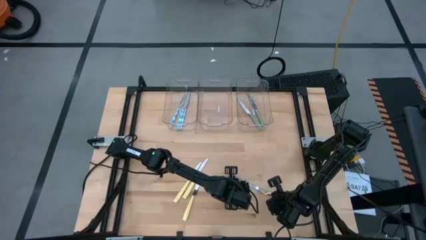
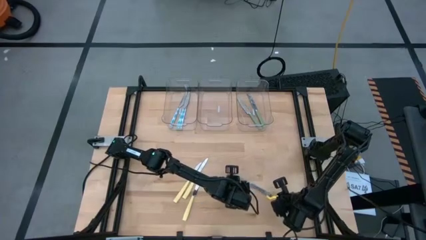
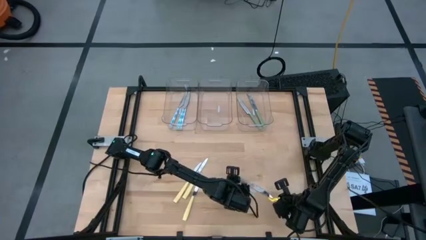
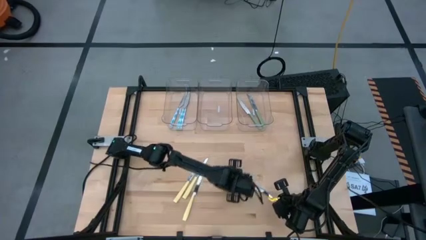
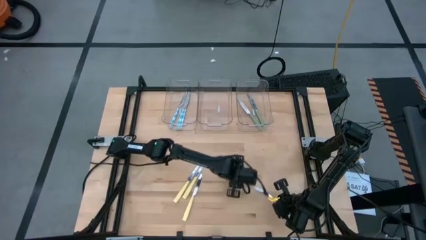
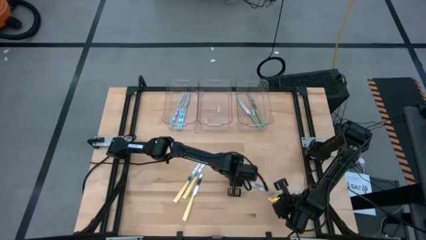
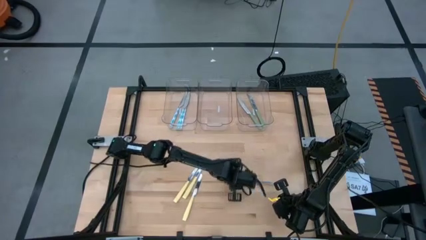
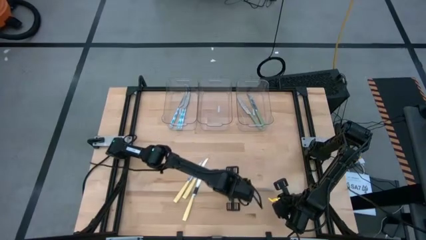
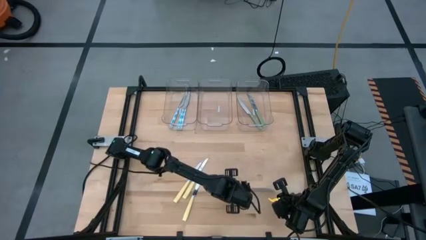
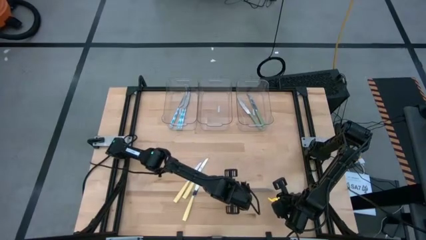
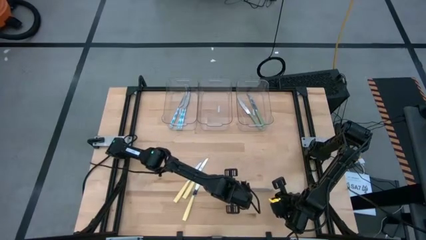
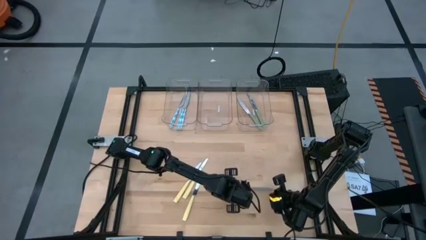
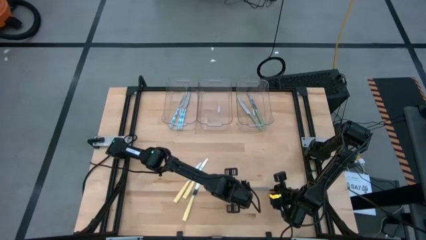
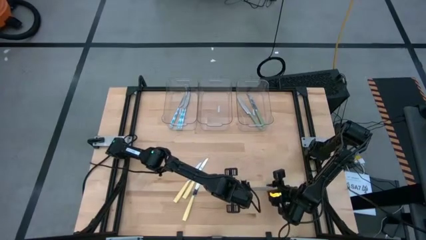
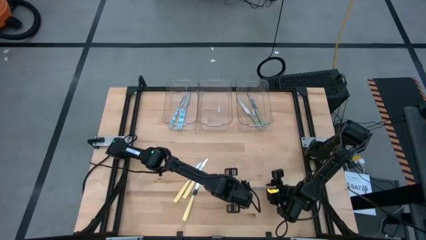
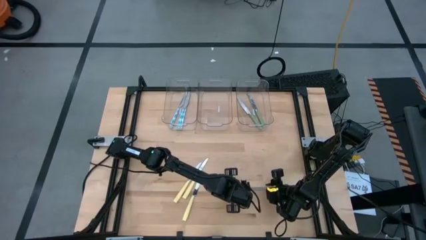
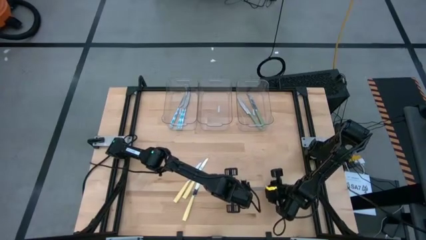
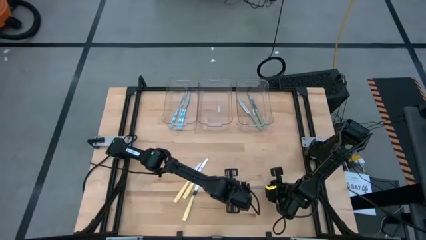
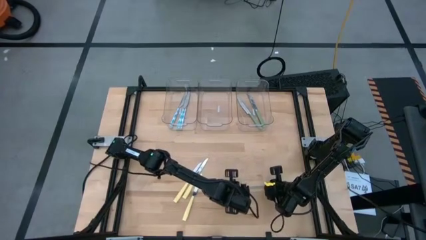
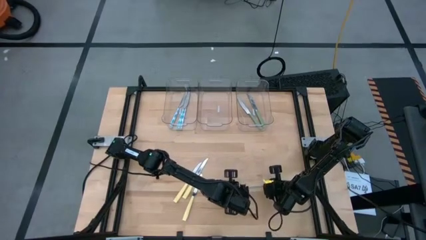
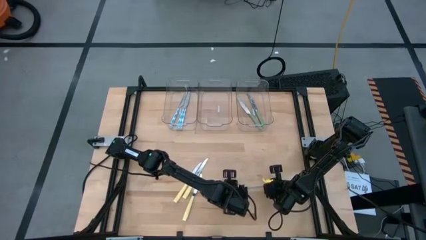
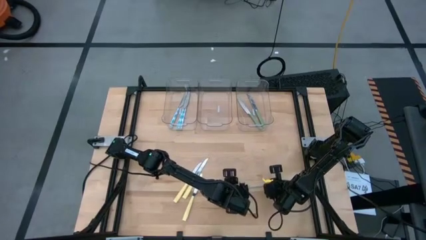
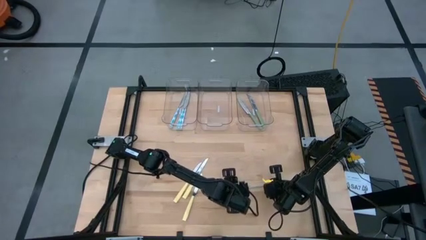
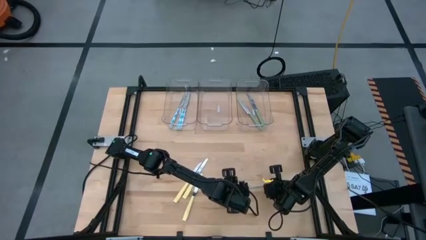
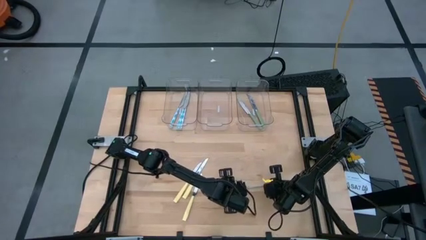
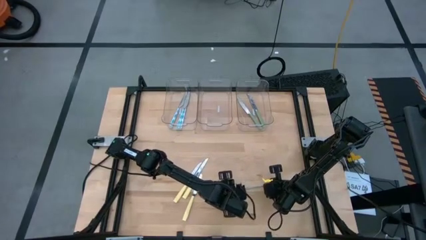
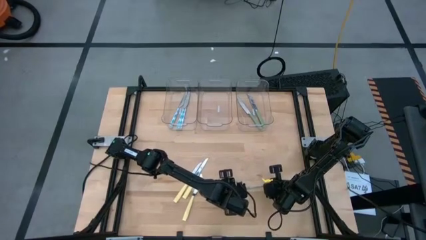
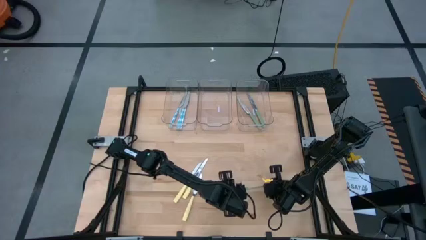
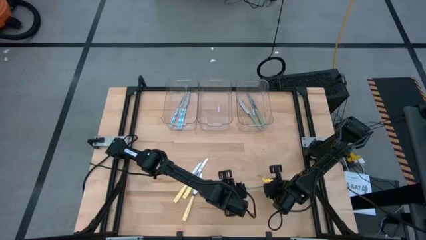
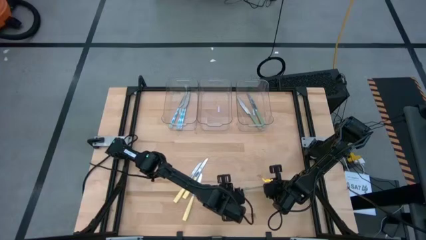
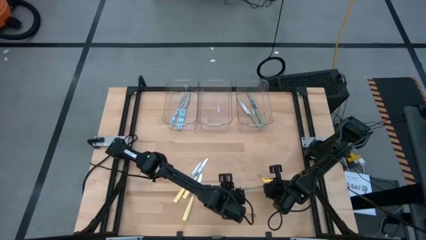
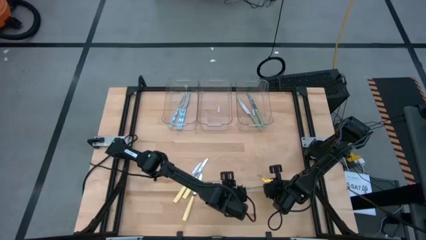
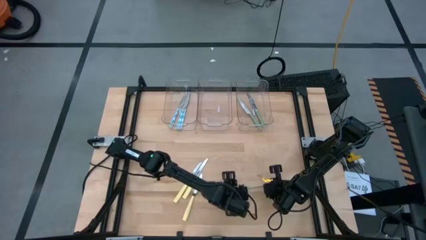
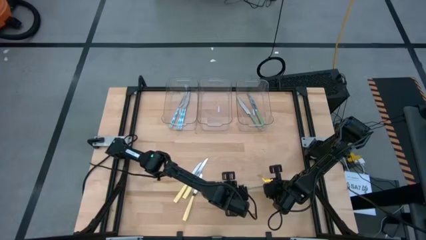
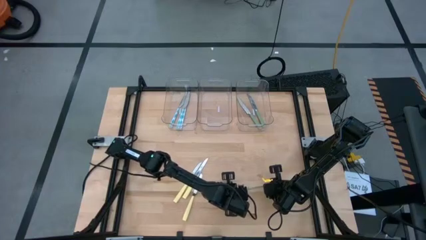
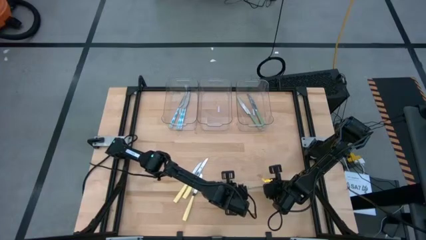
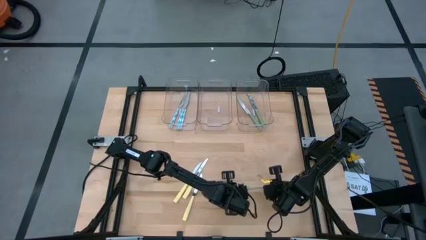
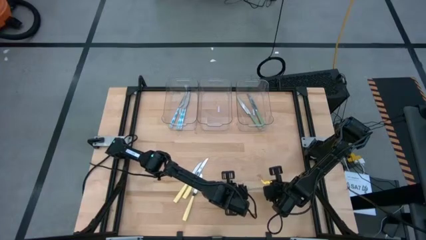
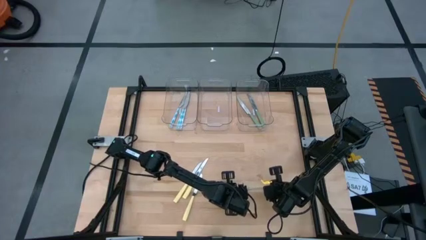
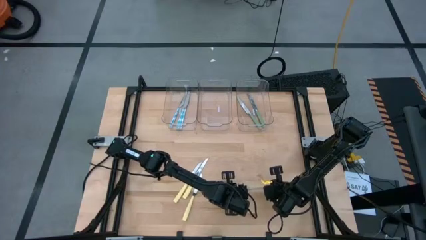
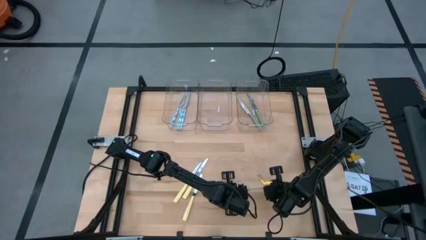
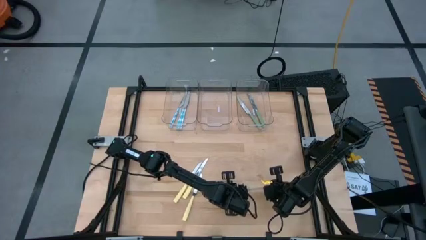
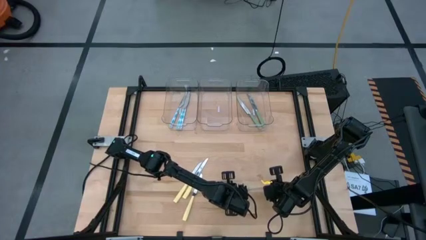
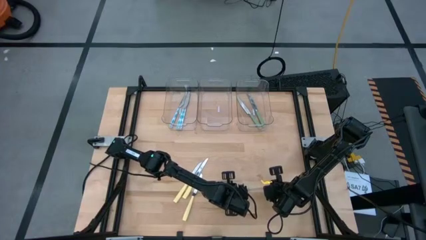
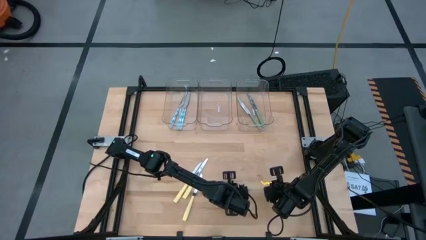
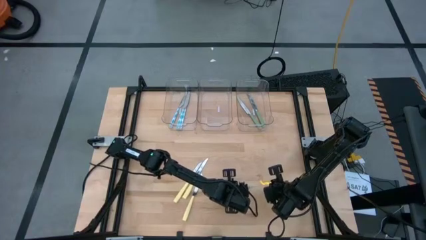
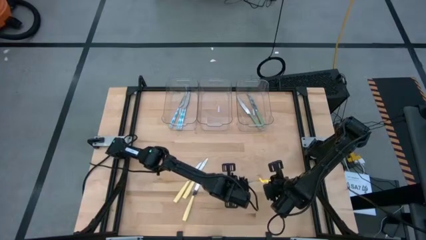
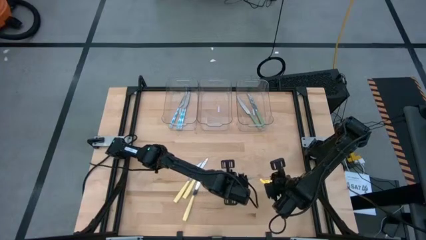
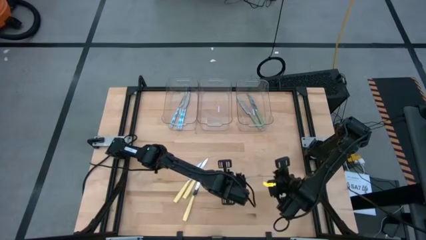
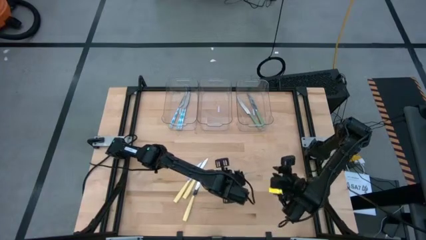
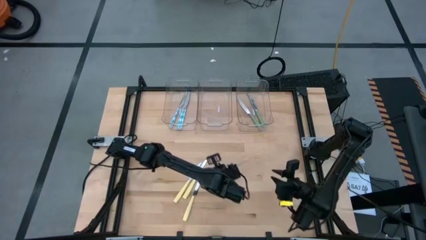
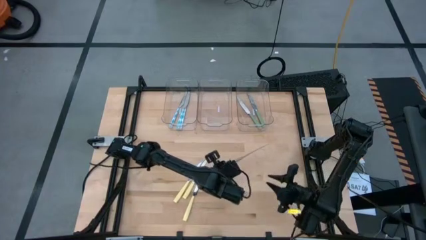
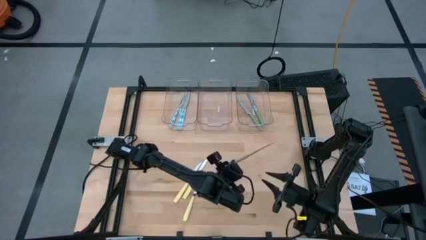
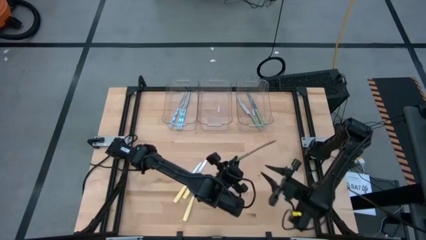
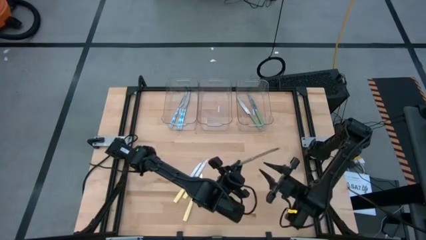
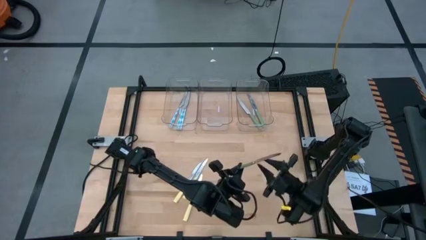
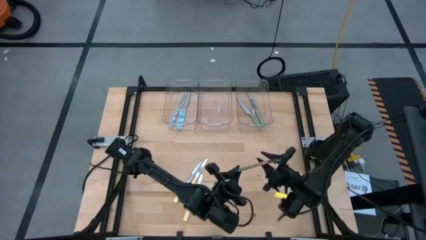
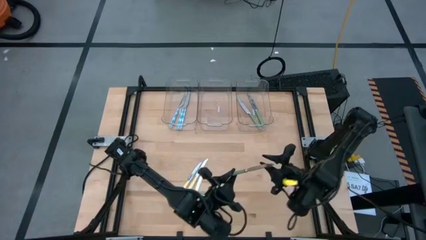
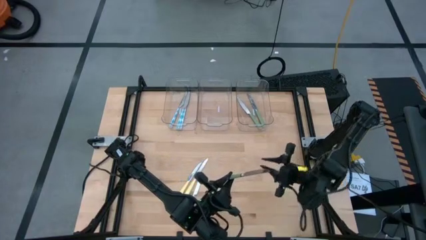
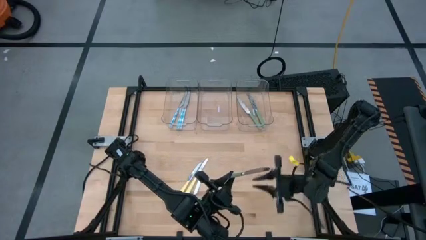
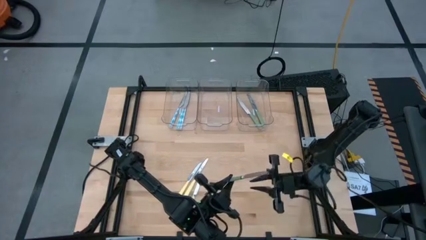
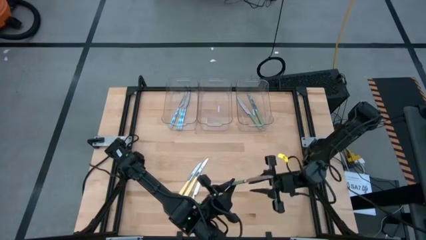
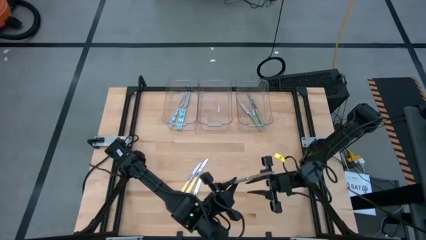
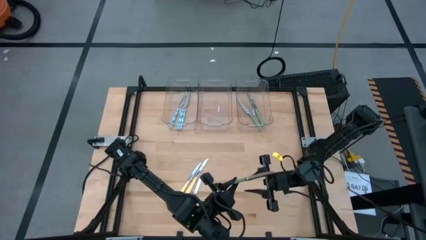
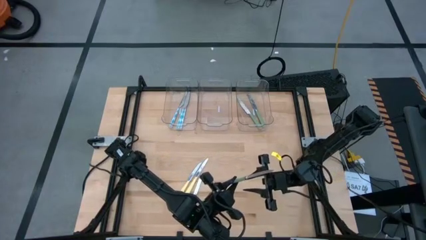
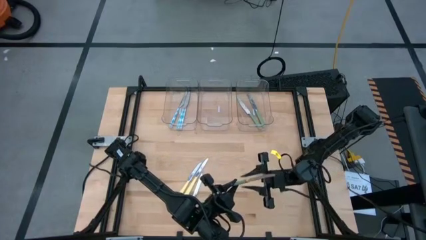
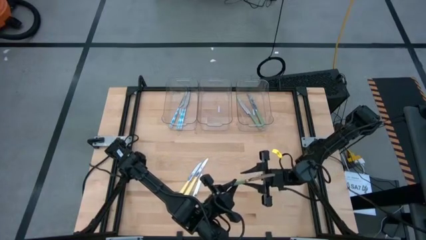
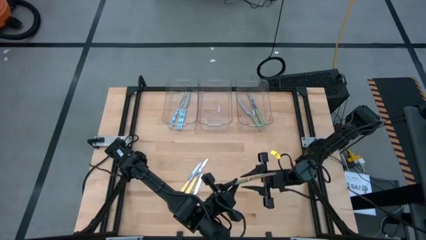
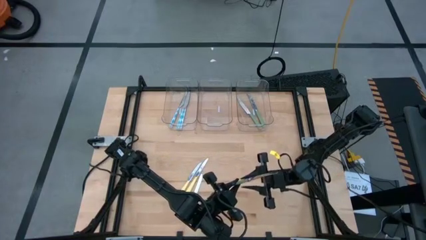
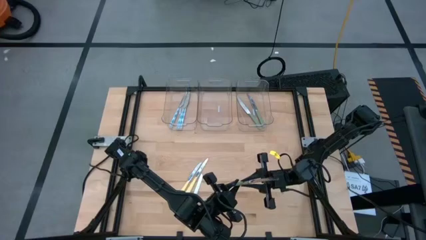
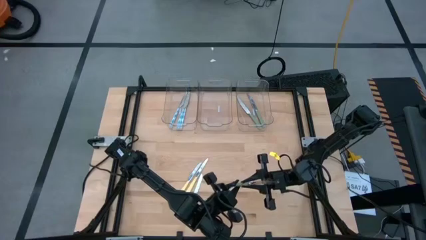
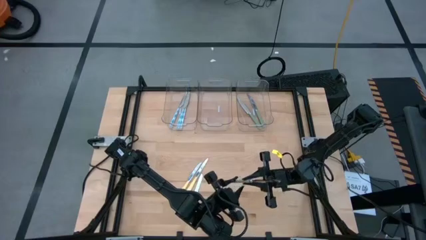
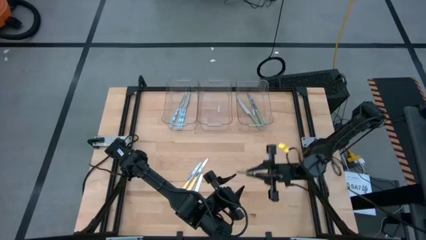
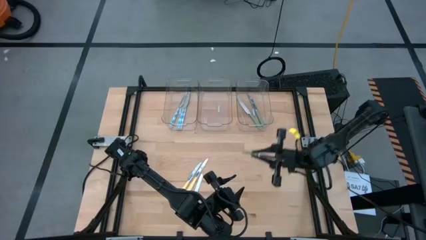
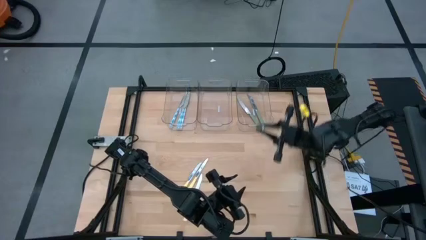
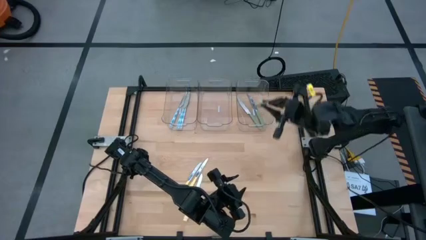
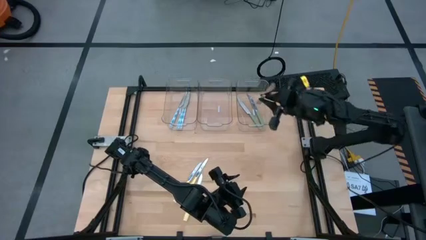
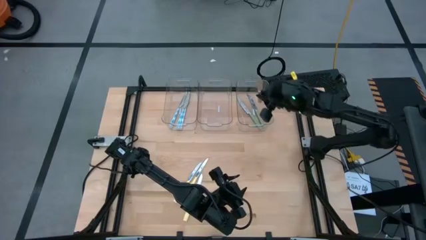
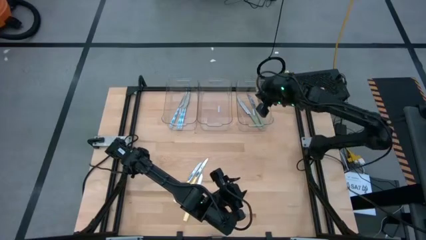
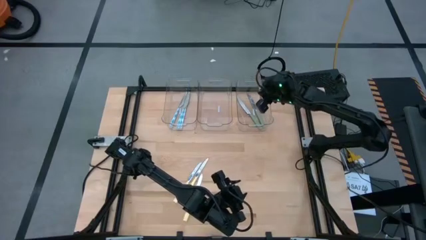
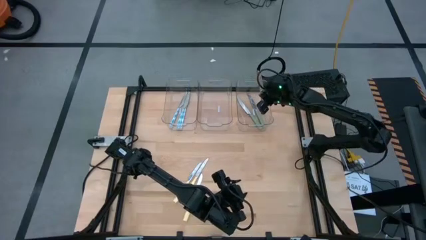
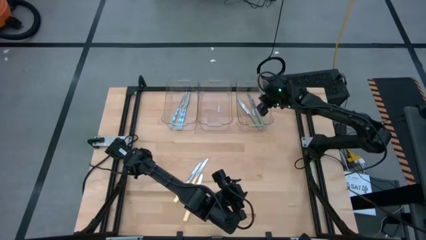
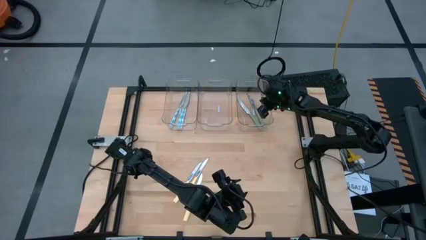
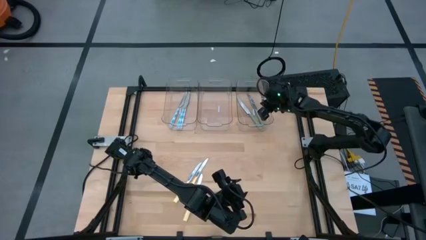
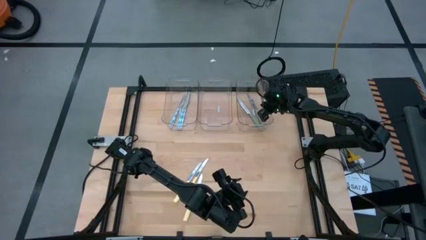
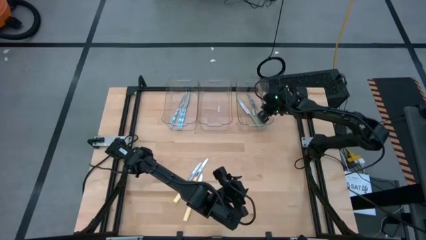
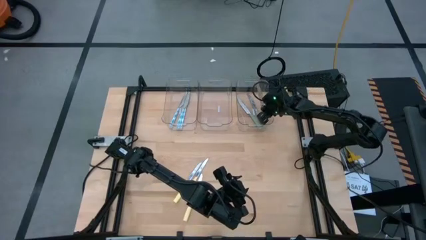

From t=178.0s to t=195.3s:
Task: Sort silverware by color (type)
Put the green knife into the right transparent bin
